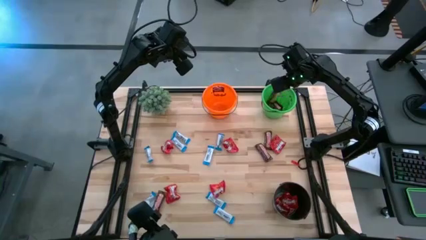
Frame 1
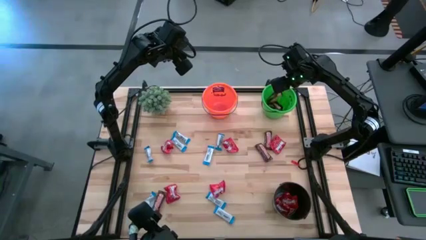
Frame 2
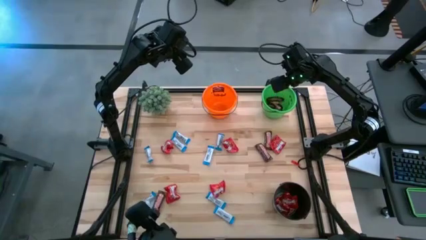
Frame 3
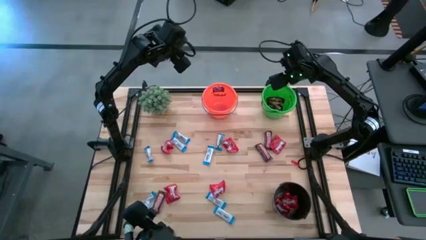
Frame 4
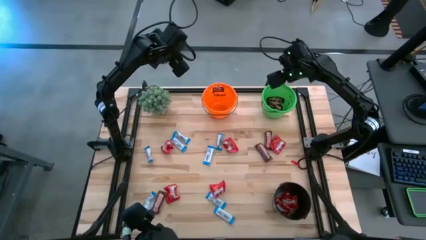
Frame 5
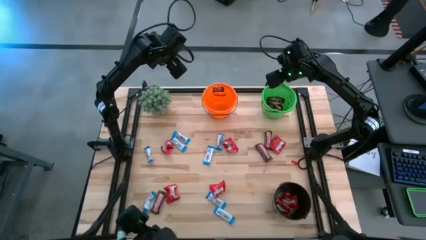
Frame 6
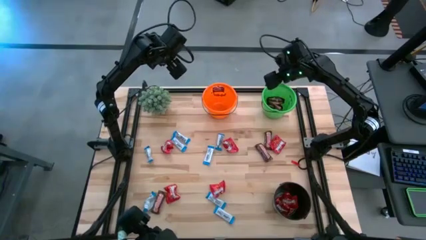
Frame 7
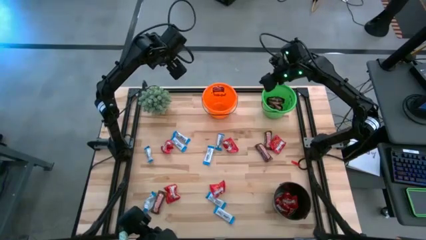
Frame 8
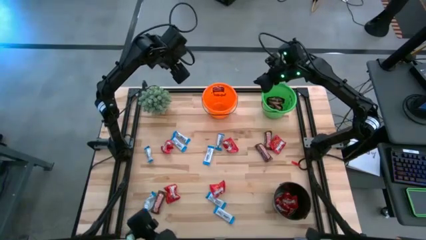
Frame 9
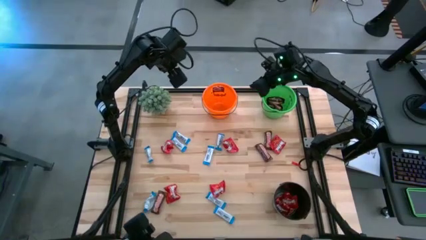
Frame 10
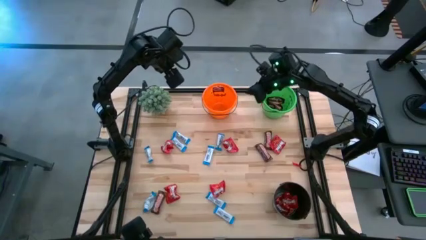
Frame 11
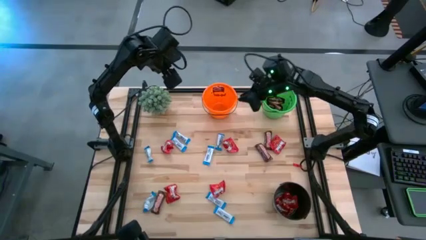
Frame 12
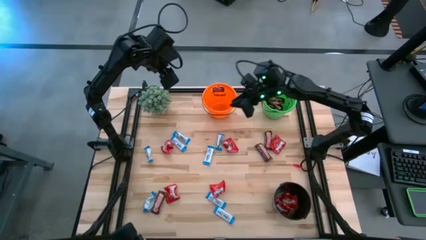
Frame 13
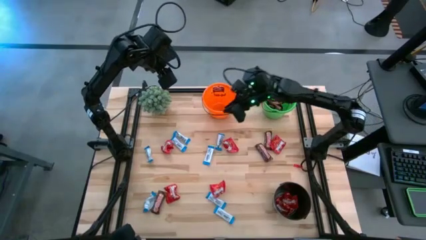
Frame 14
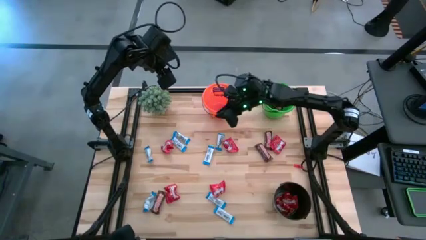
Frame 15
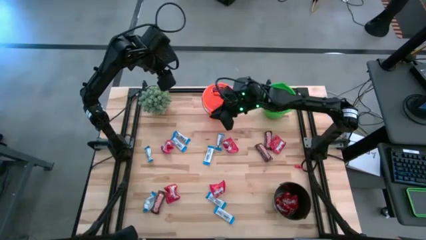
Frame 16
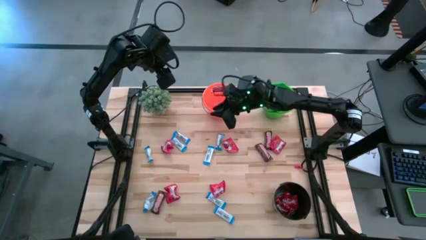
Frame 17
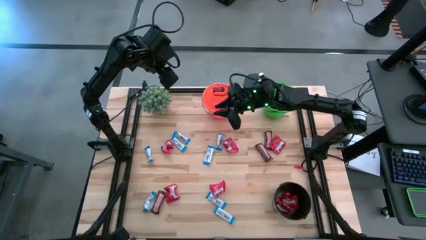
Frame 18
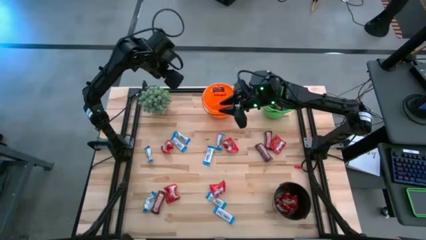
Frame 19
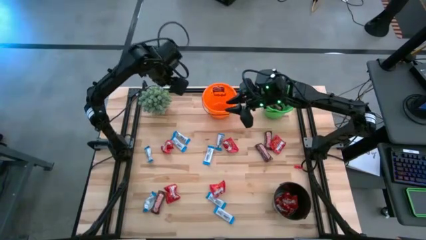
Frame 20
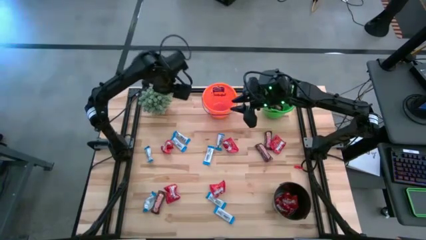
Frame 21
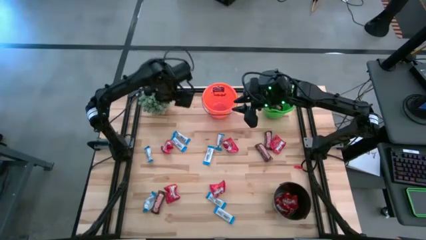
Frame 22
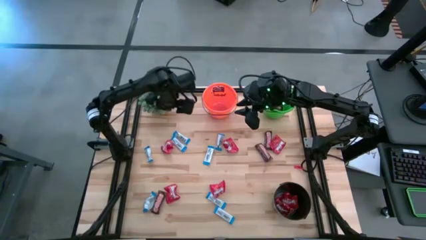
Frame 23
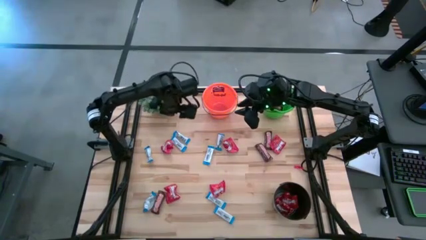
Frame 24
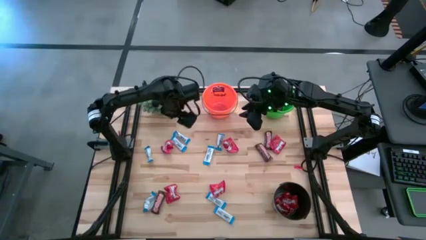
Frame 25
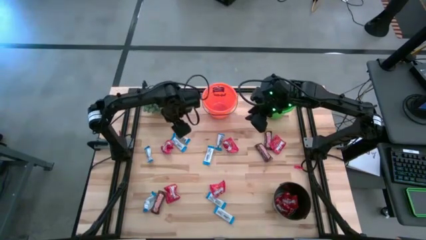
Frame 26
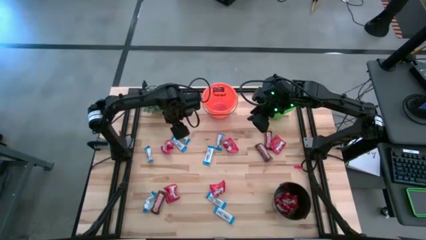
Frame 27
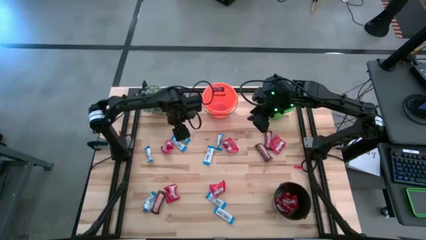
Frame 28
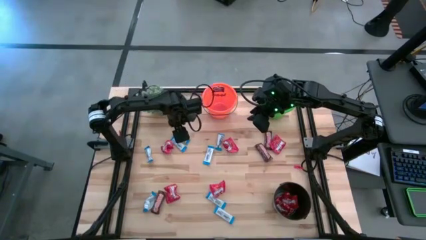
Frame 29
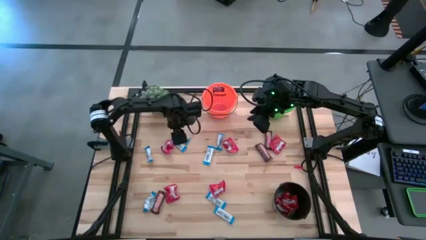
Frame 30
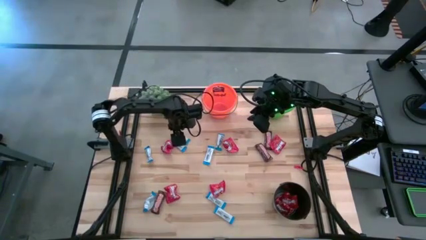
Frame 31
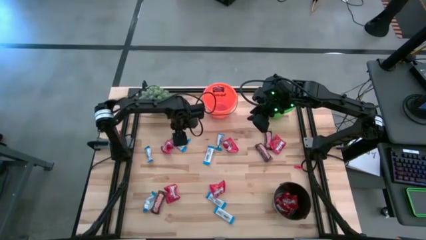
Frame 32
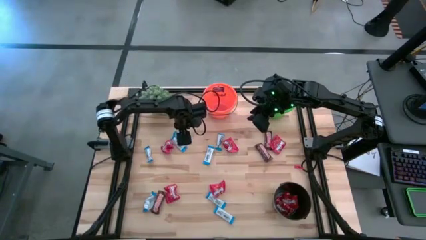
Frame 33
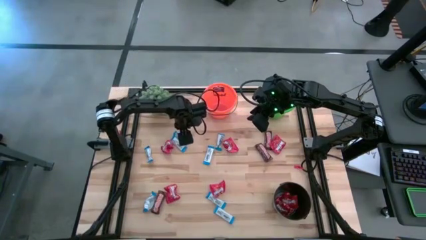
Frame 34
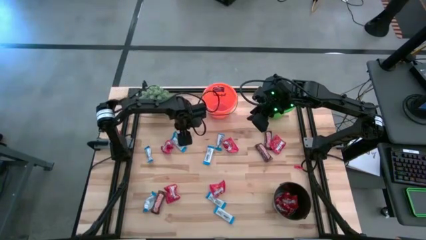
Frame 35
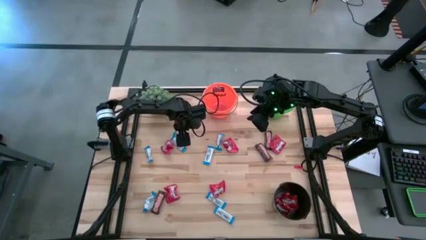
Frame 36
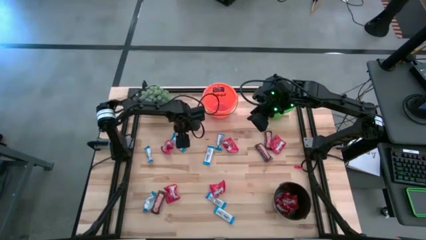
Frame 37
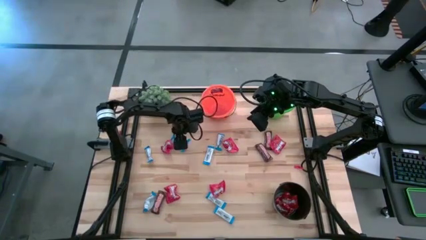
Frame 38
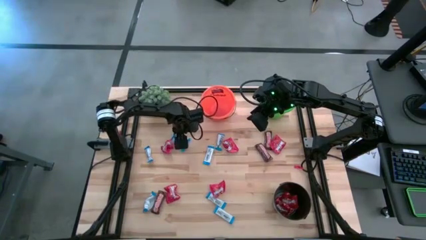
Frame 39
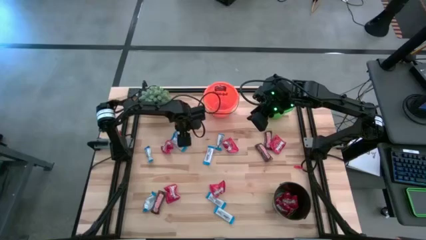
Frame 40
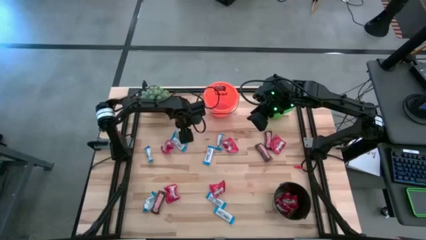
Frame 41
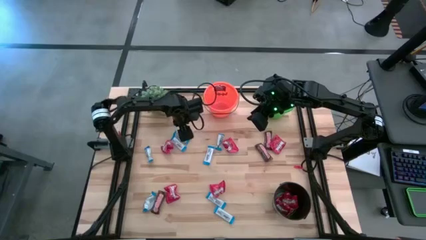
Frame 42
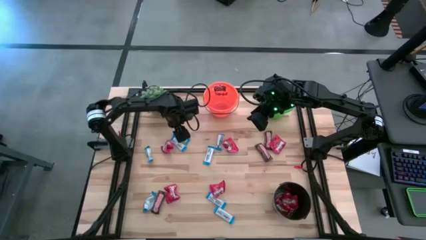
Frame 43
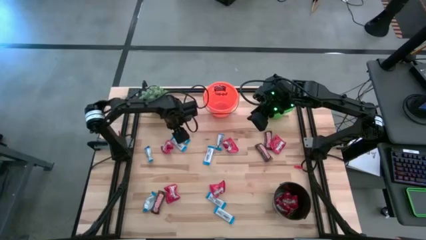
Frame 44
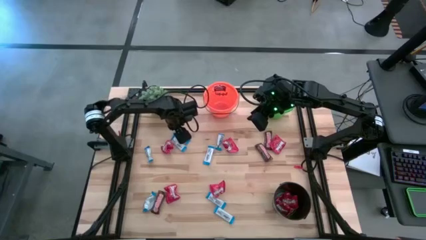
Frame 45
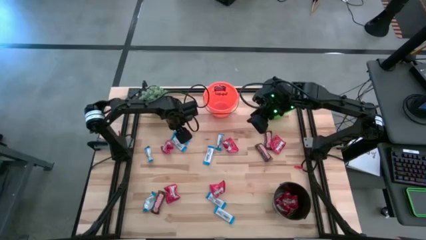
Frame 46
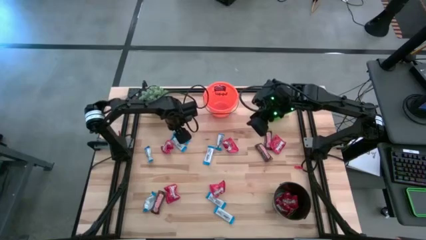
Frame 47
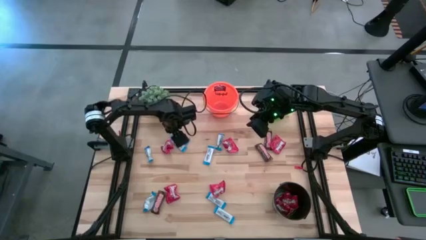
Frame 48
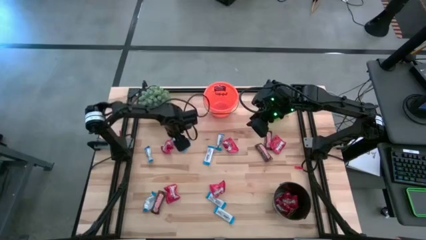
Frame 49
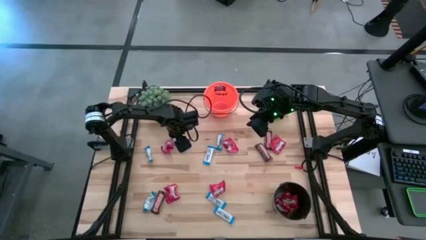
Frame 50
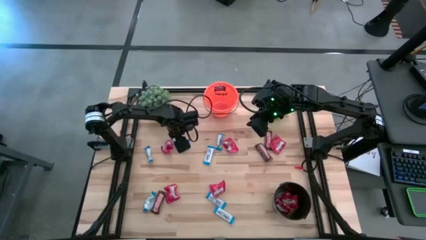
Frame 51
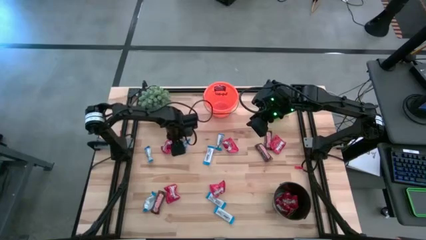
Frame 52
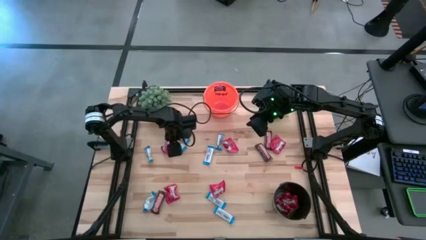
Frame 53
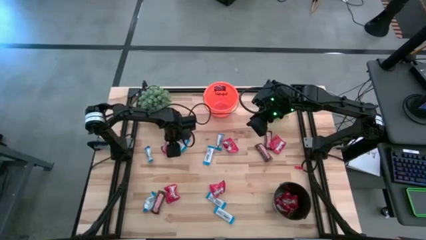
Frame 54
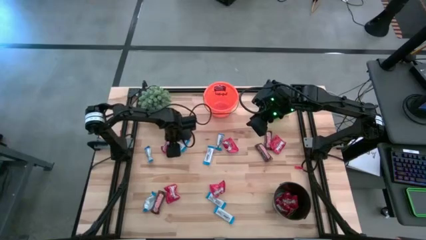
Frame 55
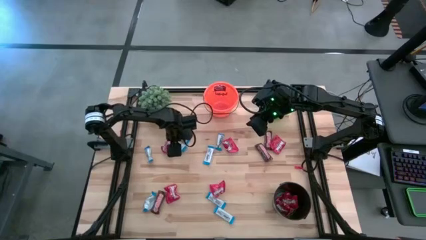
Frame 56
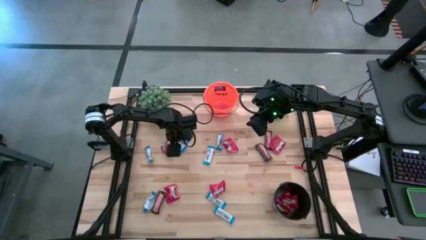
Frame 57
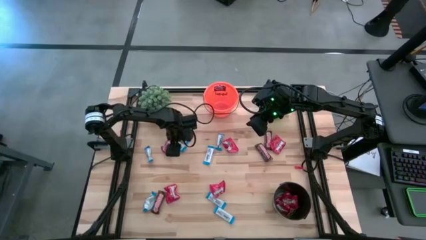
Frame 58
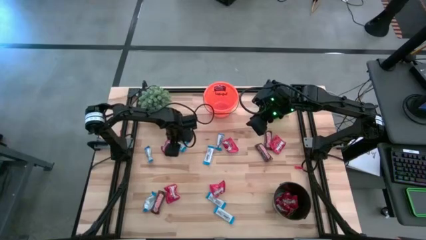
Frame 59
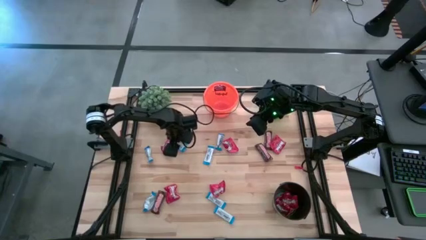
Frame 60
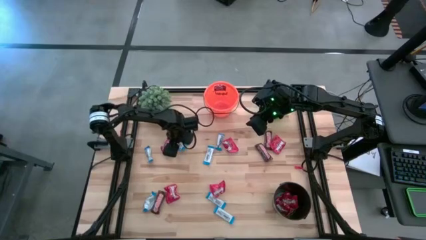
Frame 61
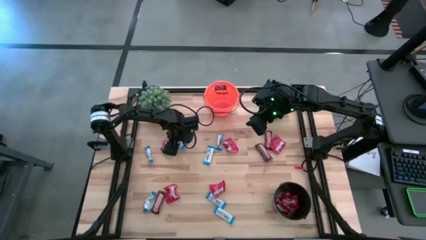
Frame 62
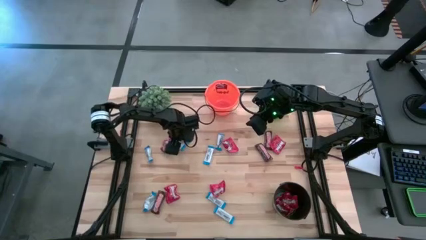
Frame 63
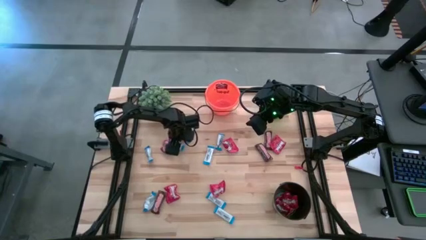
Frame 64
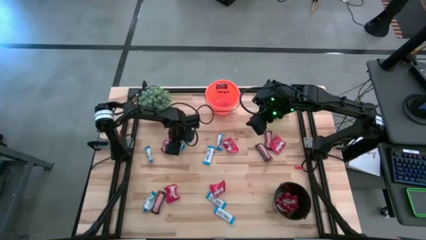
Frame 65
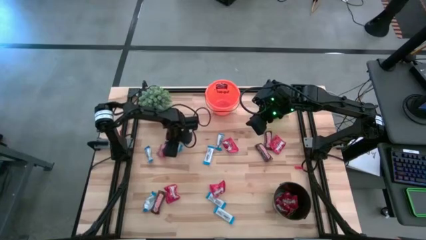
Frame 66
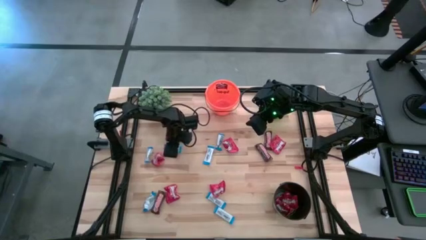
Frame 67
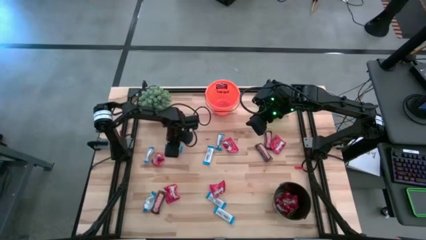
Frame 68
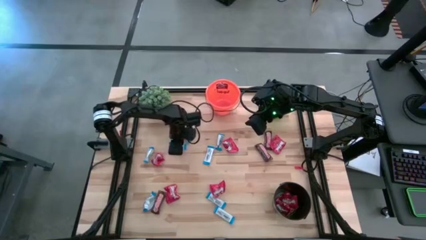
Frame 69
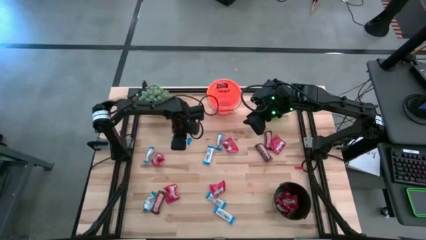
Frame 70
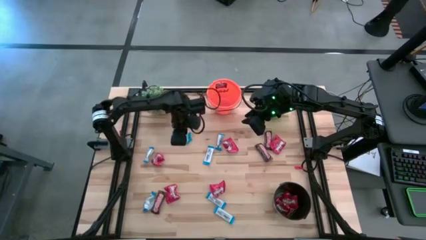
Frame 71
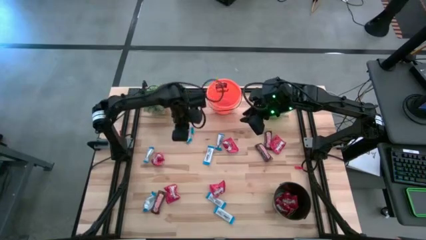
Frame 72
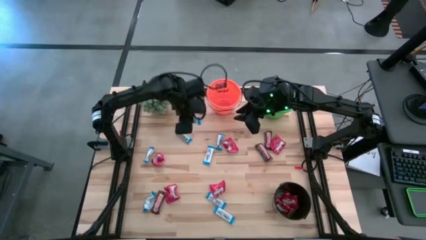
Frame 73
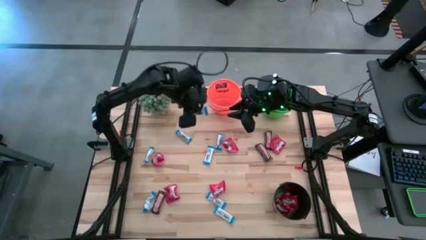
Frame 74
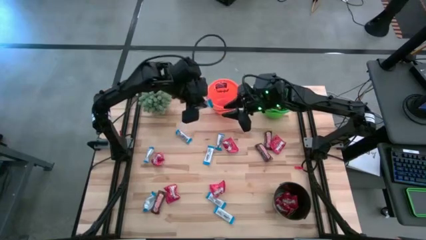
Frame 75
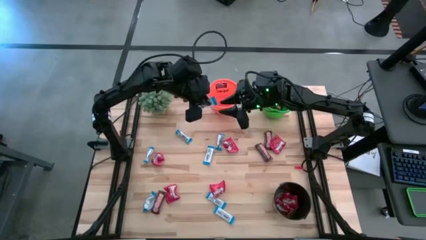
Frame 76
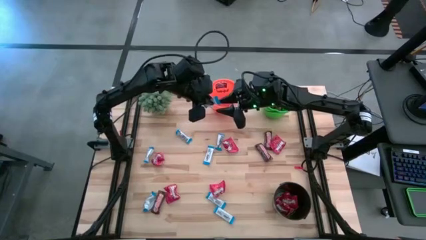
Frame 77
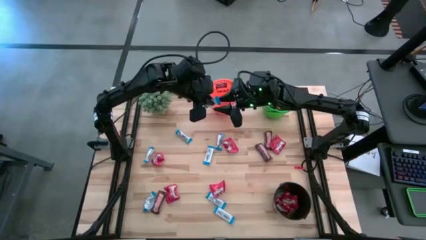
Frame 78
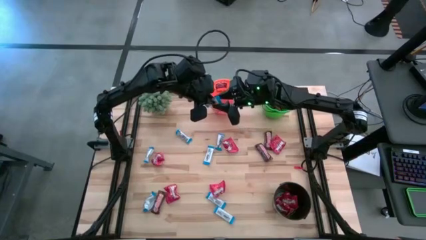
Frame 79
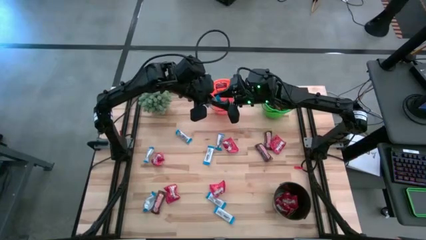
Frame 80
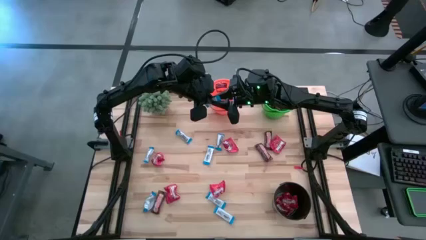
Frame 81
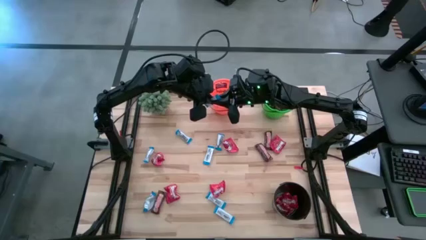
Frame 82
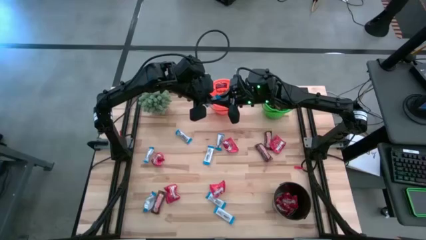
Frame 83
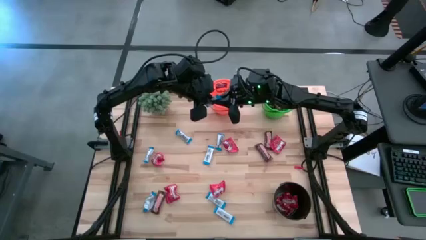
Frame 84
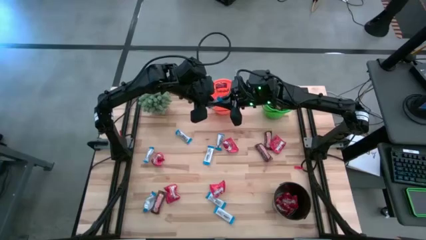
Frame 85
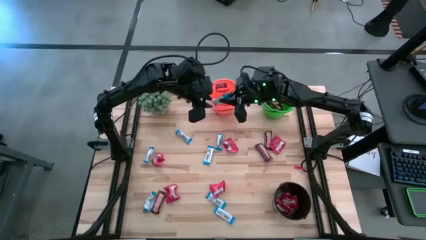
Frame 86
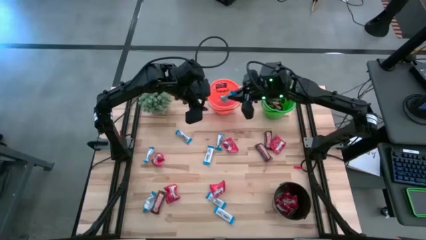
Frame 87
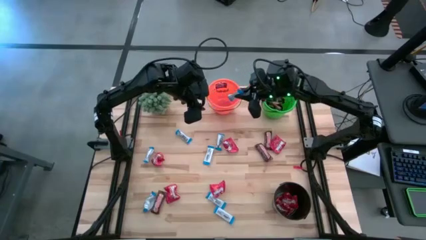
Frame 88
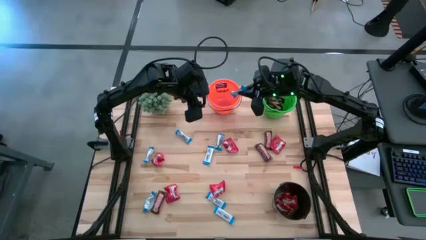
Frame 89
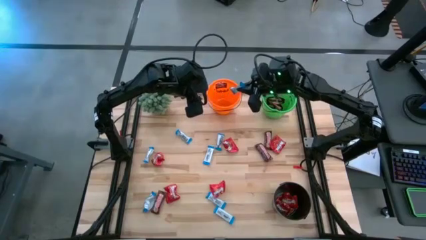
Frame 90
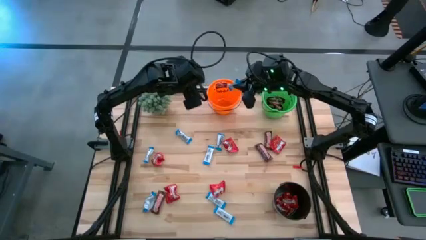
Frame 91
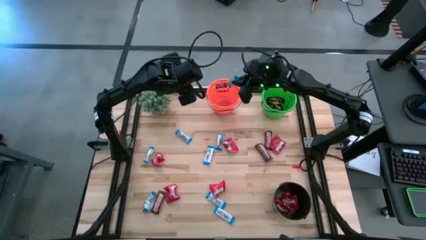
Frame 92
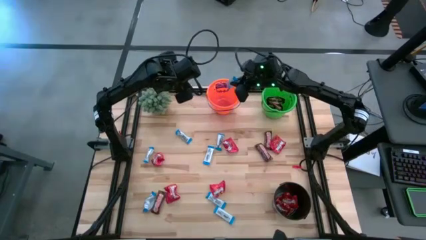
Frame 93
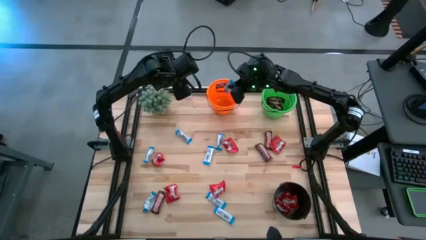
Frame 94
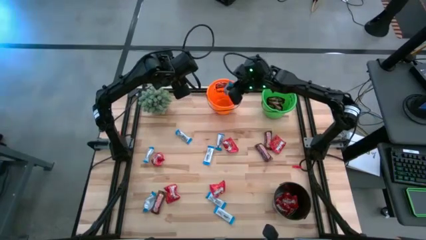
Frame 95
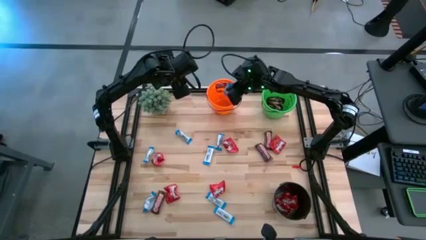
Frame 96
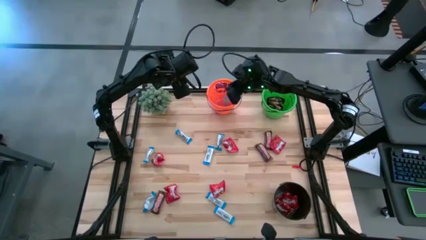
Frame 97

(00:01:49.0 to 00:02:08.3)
Task: Organize candy in baskets
Put the white chocolate into the orange bucket
